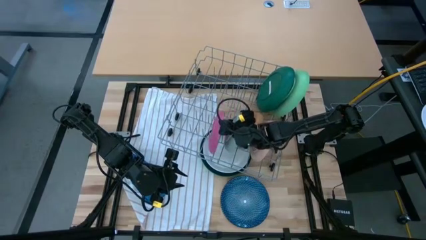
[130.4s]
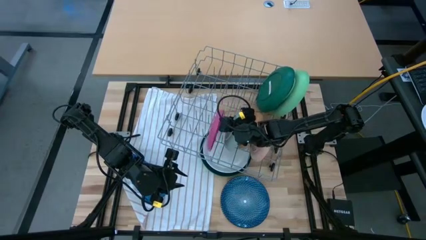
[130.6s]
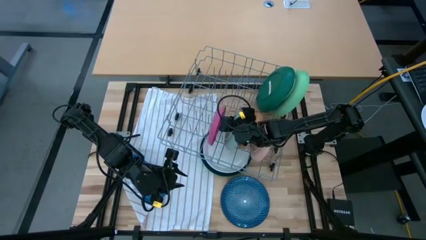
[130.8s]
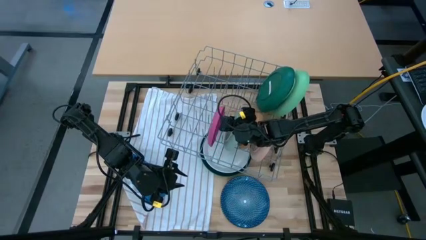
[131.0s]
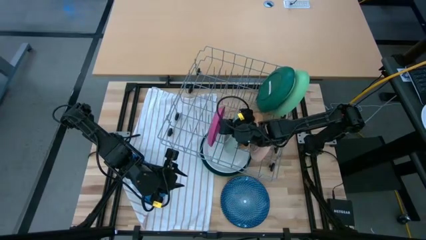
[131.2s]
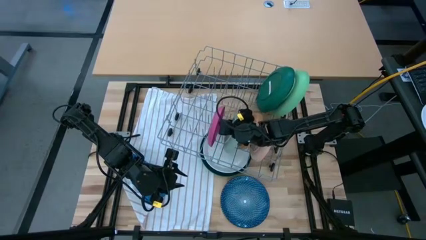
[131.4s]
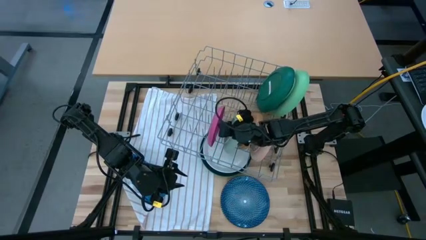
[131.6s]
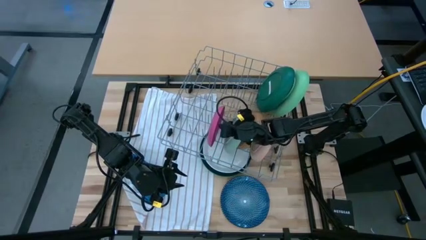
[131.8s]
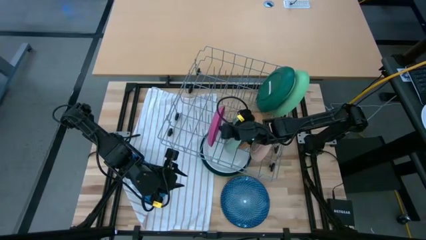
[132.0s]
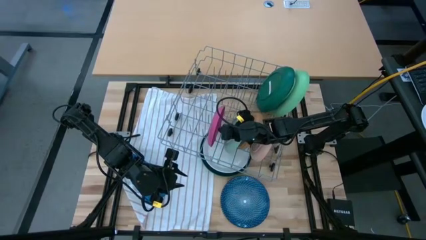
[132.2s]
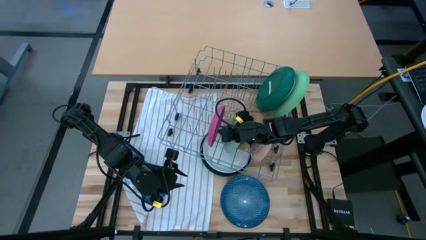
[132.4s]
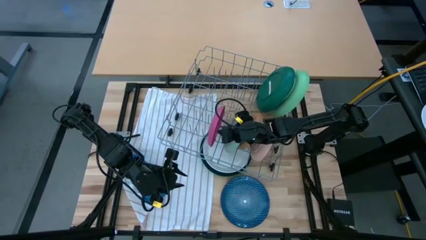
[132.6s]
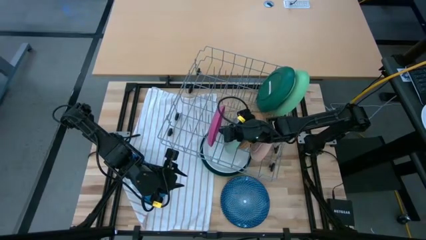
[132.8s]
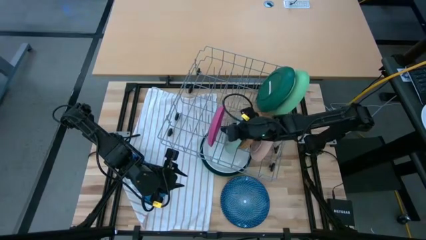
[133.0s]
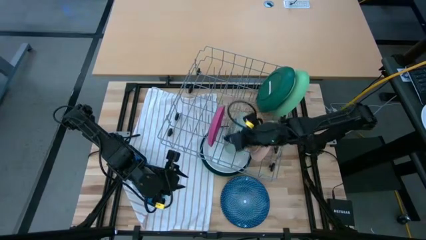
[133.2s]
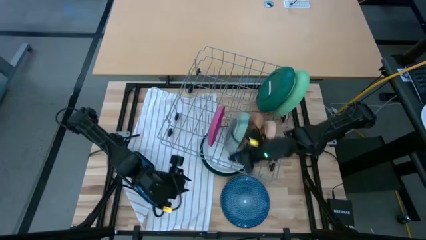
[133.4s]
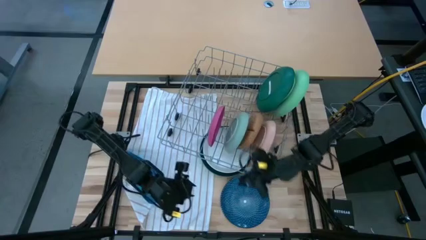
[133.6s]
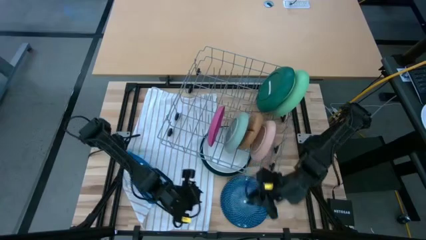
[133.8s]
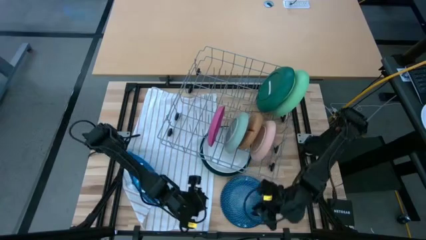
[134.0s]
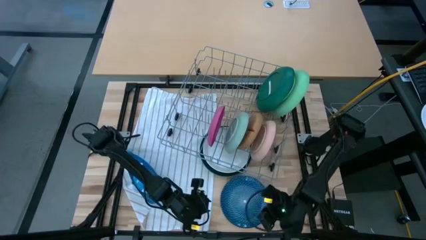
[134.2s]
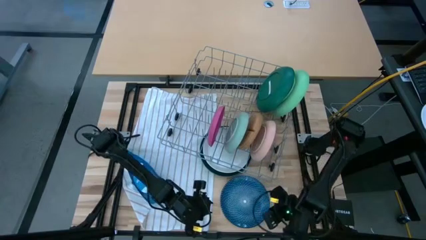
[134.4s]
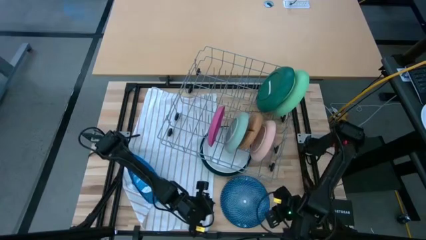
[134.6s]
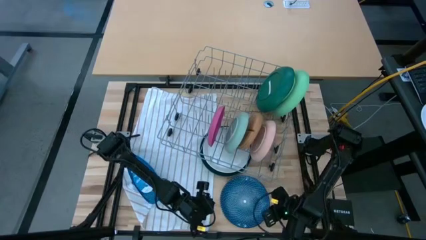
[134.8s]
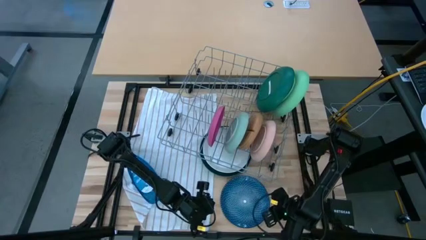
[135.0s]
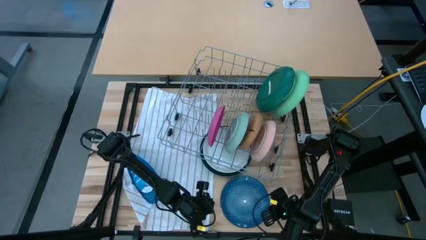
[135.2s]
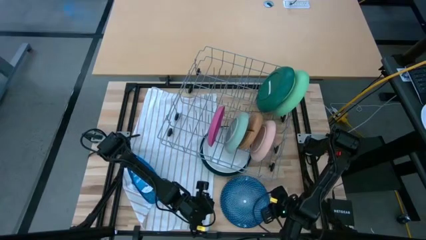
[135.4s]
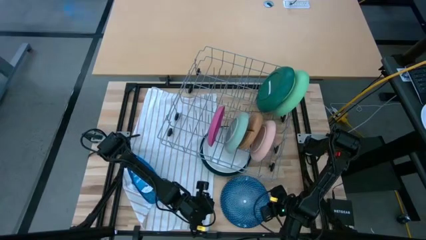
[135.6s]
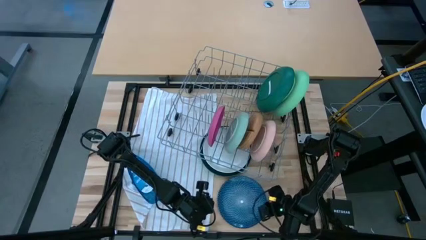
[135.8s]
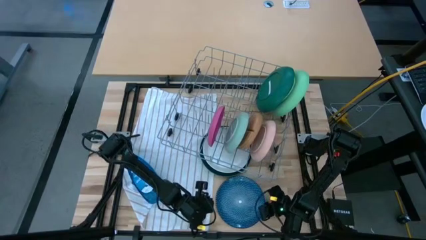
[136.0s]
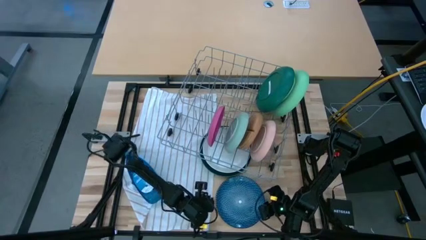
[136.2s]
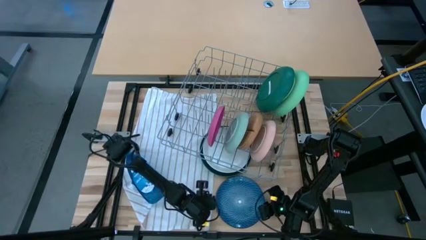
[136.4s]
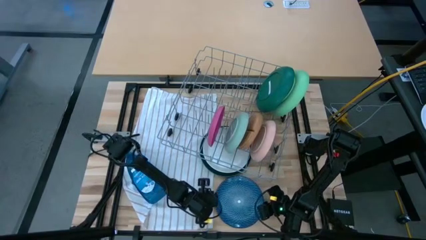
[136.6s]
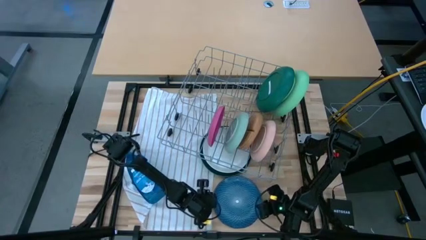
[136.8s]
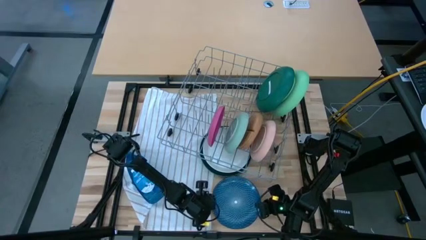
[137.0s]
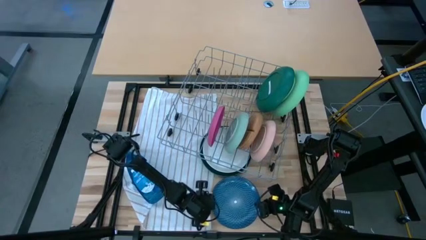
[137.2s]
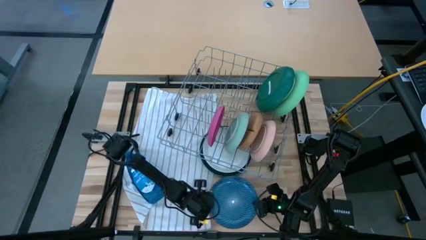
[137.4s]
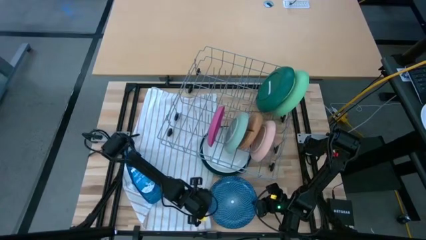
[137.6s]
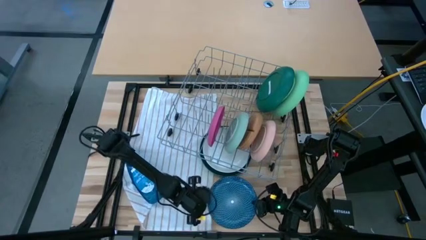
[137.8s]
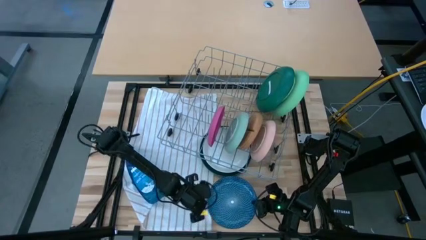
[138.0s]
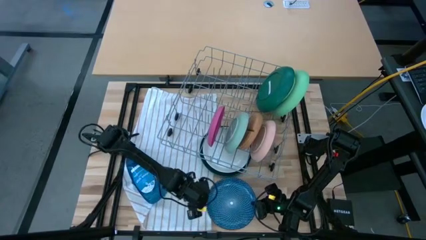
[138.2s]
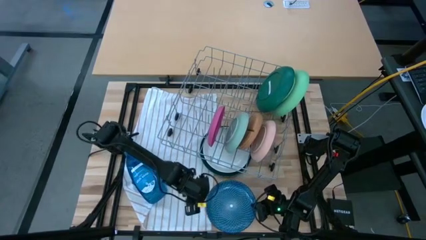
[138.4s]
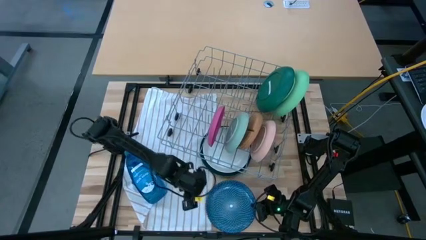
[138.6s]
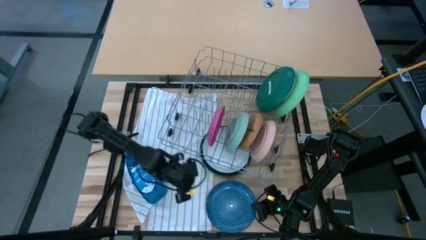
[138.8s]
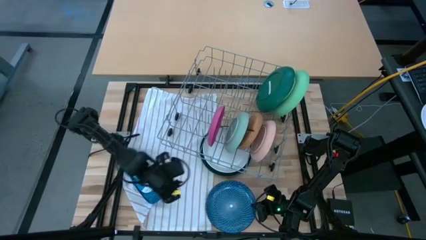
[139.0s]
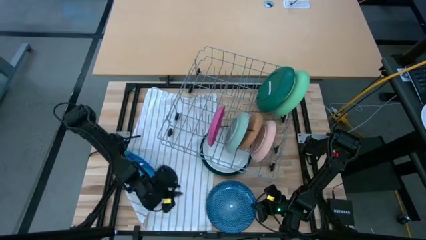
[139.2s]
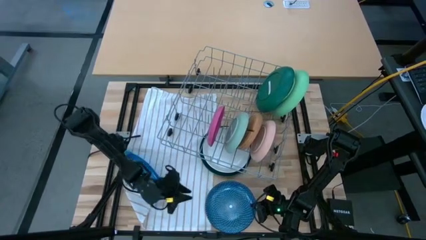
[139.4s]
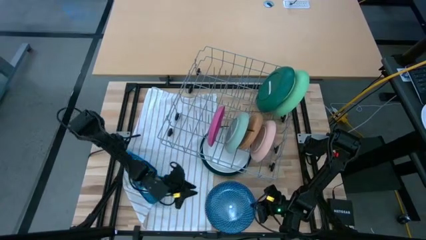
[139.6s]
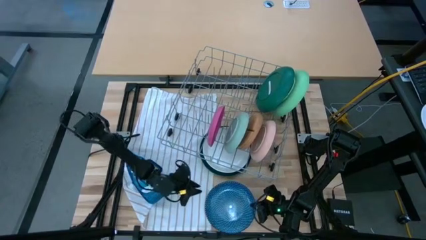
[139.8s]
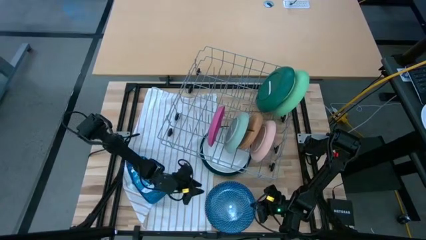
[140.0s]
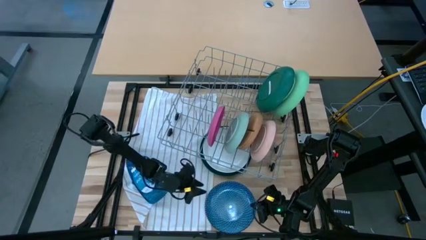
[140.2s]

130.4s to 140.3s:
Task: Sort dishes
Put the blue plate in the dish rack

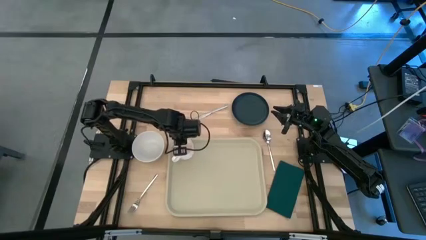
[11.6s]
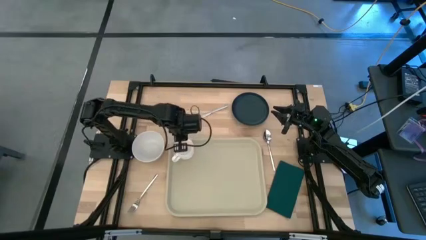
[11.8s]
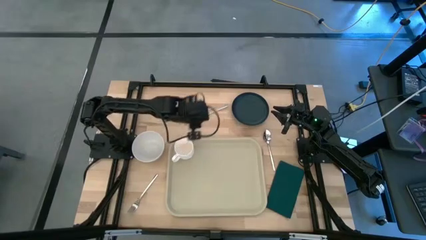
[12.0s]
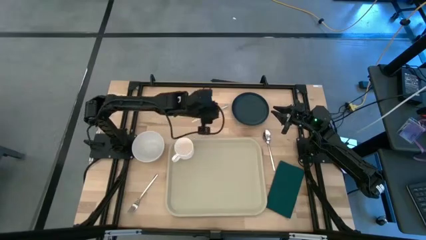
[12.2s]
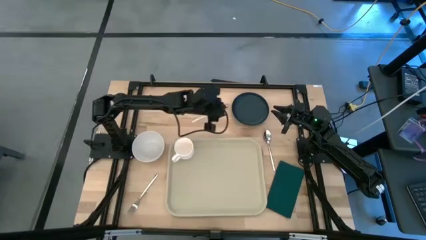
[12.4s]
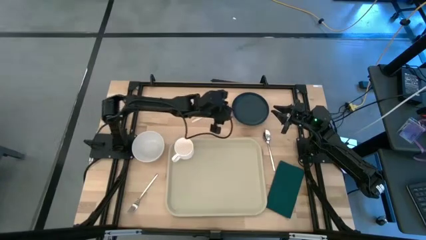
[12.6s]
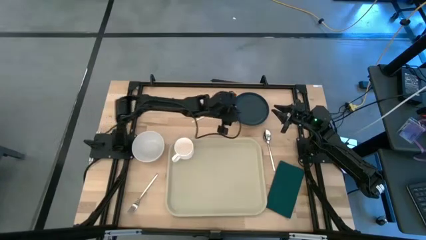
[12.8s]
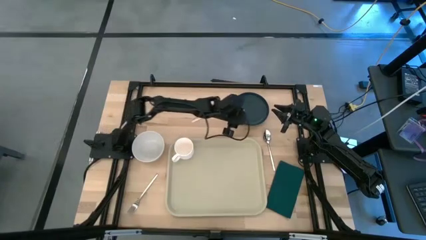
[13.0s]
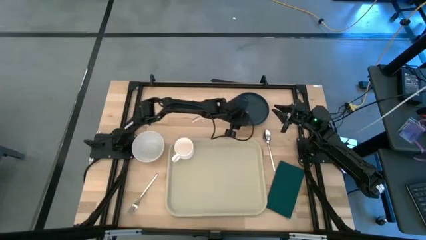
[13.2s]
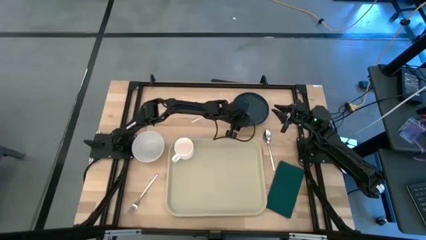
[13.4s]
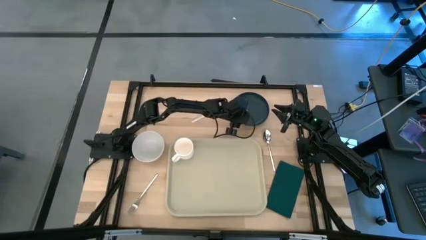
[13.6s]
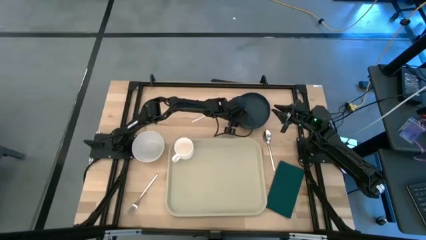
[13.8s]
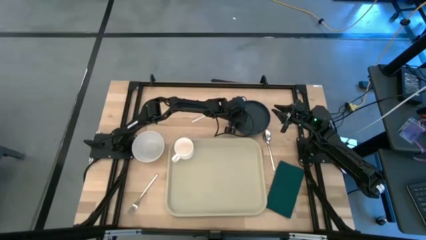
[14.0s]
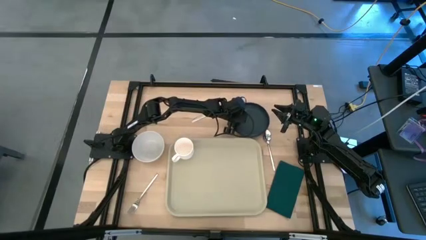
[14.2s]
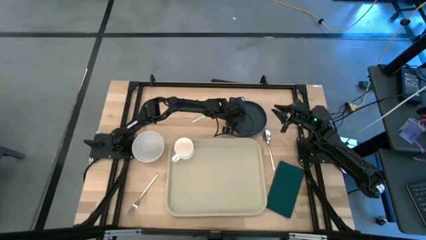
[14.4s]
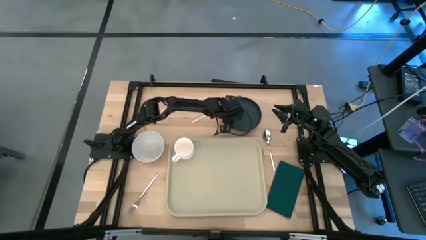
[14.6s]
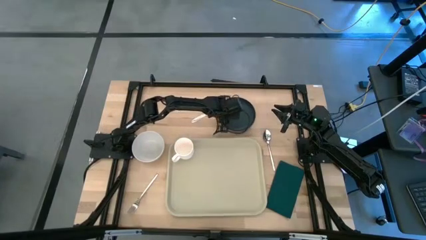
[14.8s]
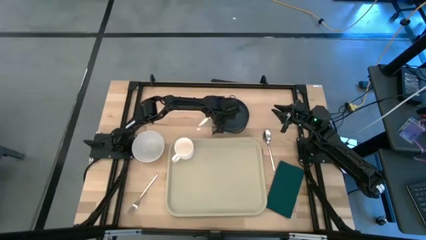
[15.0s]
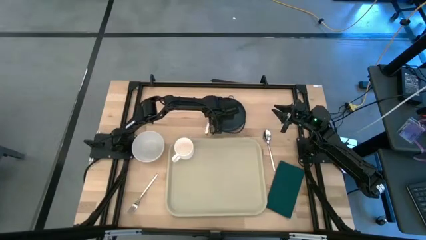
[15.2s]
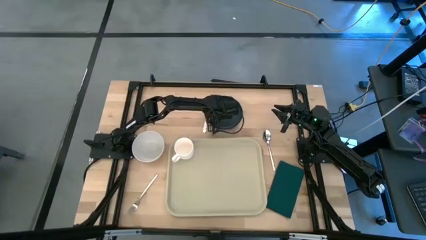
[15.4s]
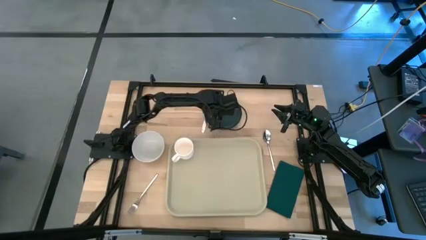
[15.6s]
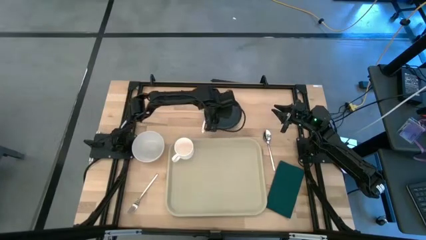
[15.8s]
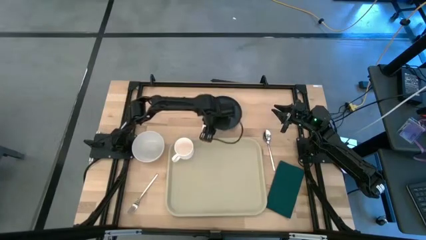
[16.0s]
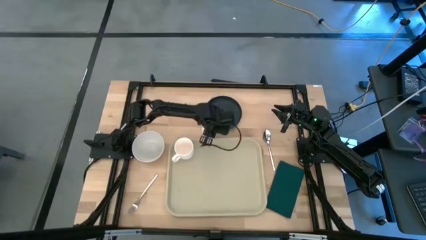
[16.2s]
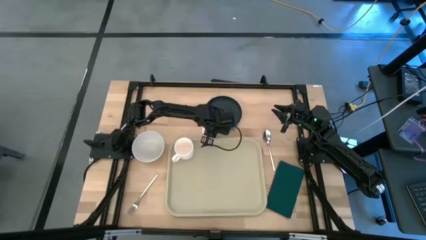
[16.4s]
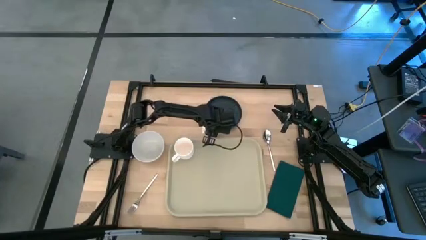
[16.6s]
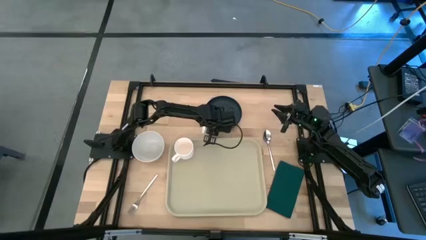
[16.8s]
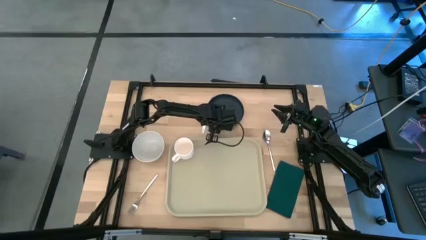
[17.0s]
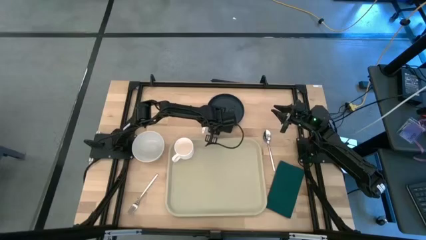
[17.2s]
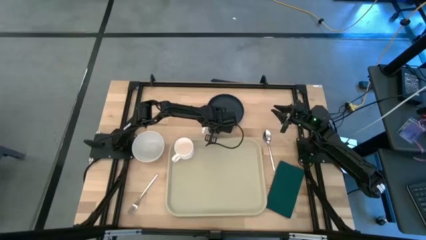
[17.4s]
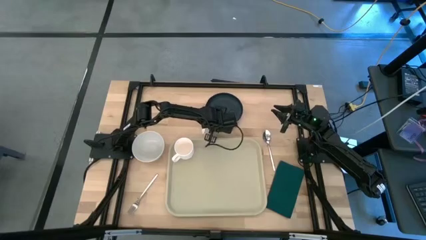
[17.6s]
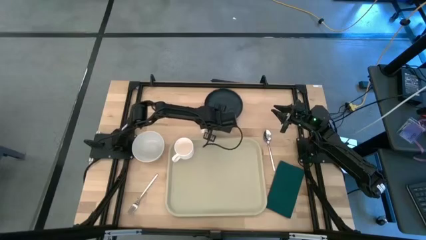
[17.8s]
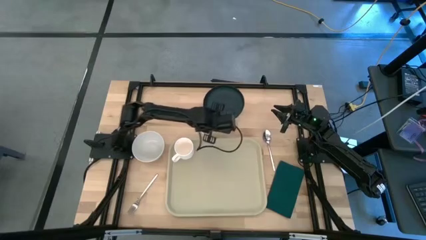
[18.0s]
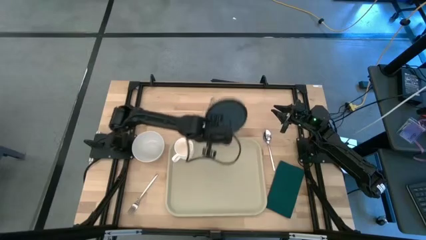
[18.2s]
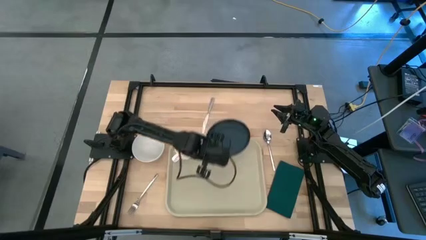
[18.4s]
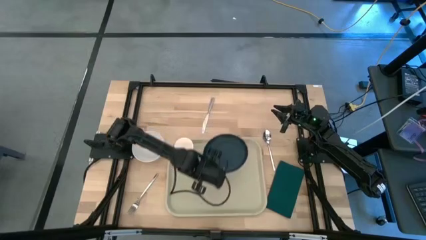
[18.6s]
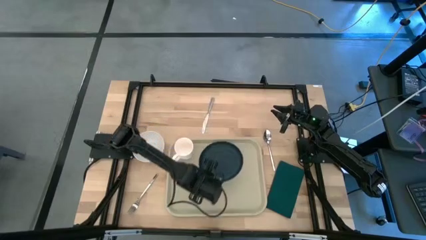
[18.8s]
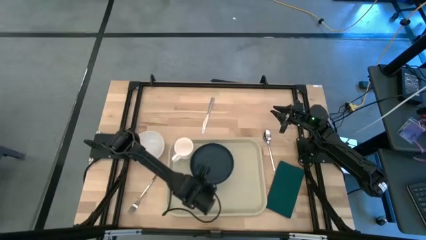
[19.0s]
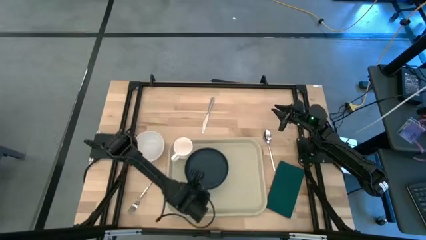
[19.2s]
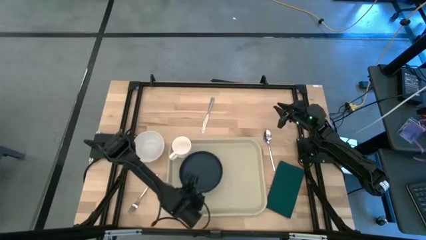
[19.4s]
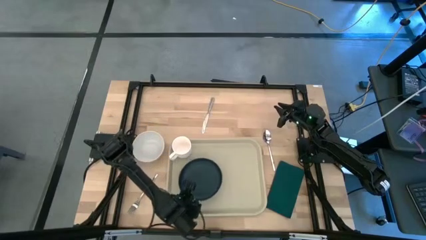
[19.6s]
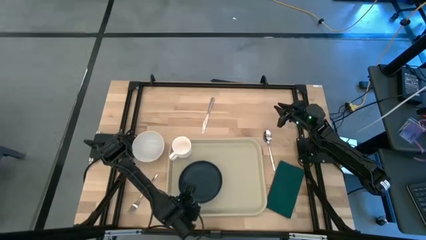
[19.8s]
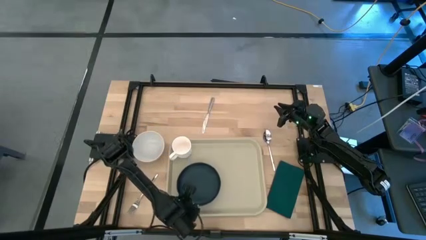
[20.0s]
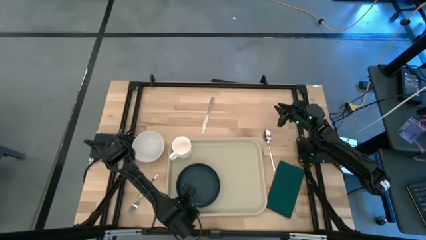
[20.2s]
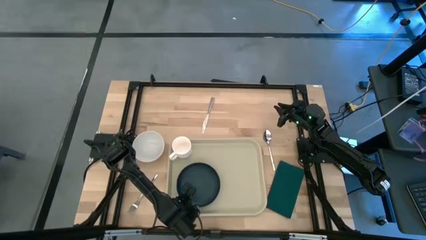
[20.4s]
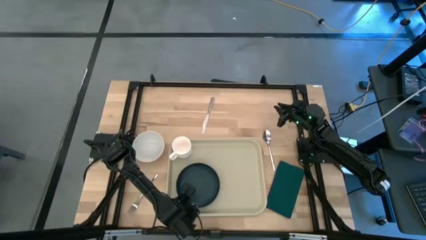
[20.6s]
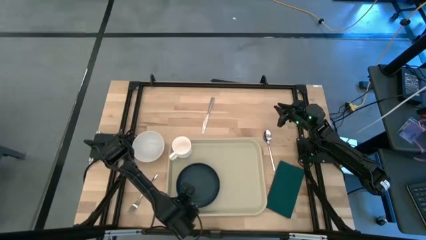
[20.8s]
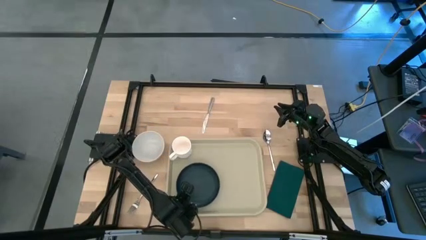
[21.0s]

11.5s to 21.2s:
Task: Set up tray
Put the black plate on the brown serving tray at the bottom of the white mug
